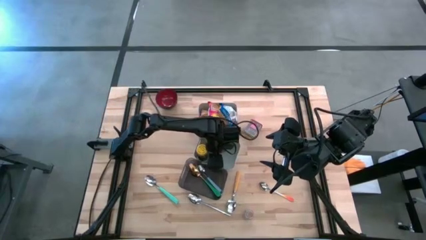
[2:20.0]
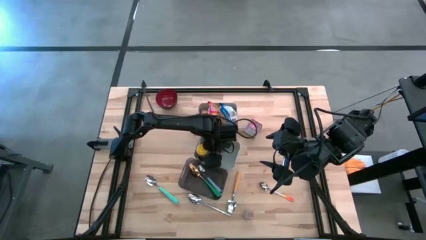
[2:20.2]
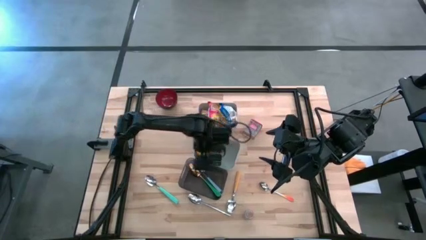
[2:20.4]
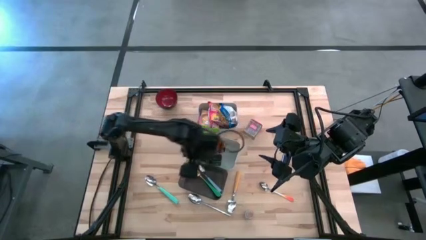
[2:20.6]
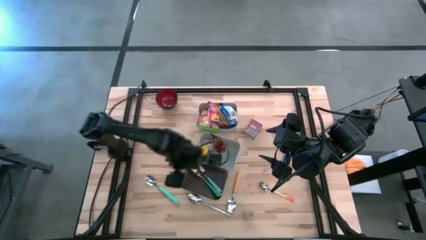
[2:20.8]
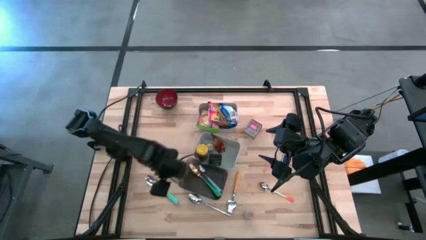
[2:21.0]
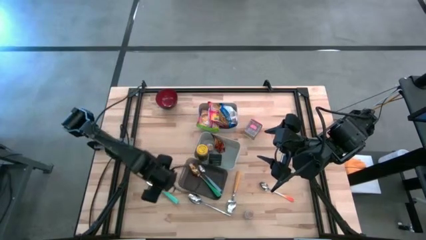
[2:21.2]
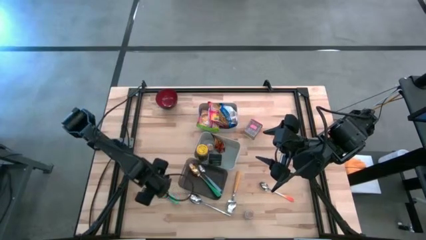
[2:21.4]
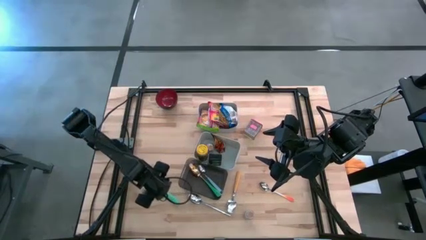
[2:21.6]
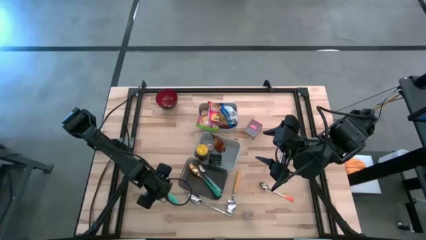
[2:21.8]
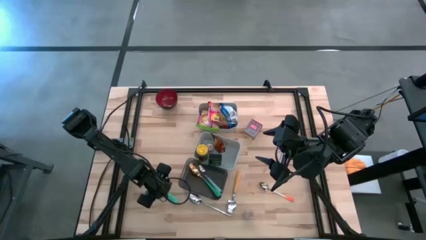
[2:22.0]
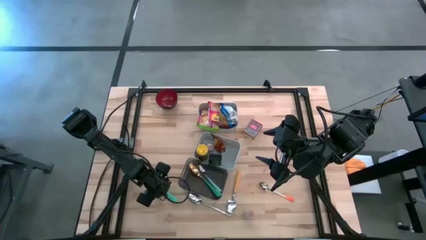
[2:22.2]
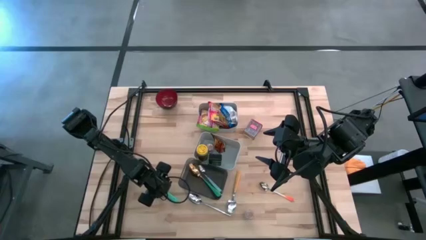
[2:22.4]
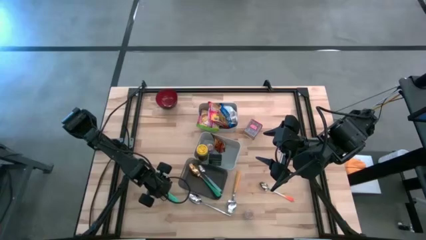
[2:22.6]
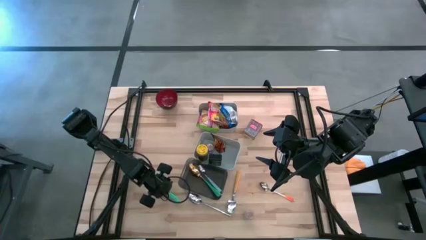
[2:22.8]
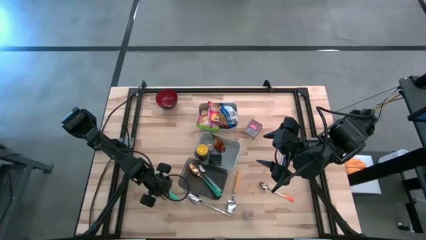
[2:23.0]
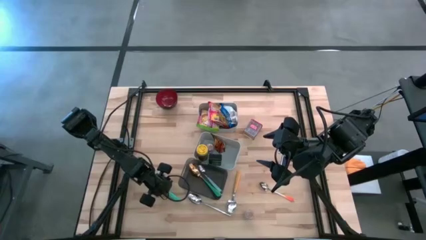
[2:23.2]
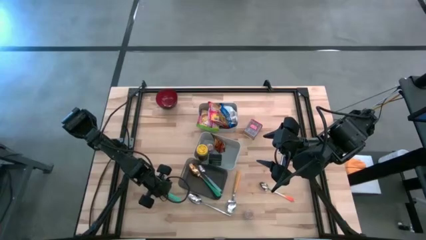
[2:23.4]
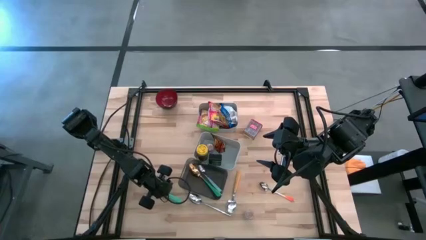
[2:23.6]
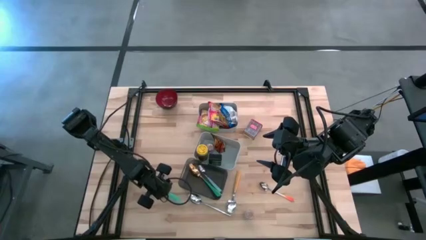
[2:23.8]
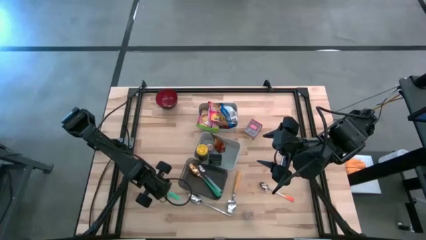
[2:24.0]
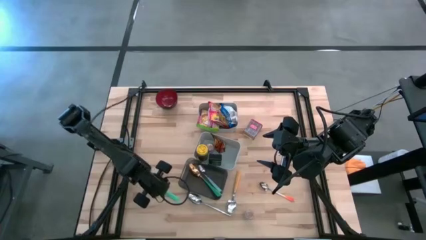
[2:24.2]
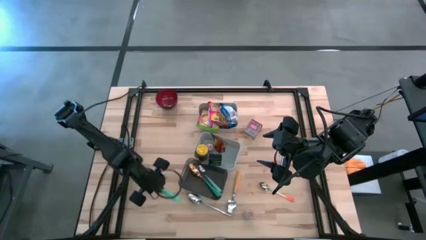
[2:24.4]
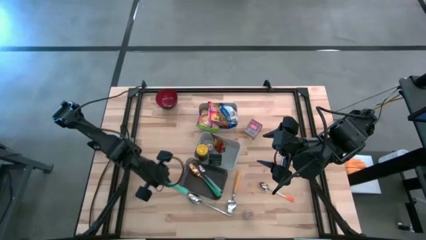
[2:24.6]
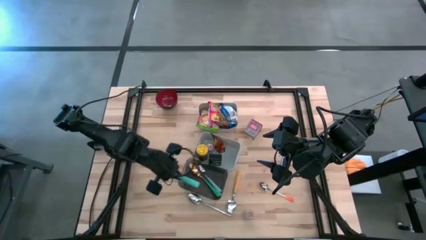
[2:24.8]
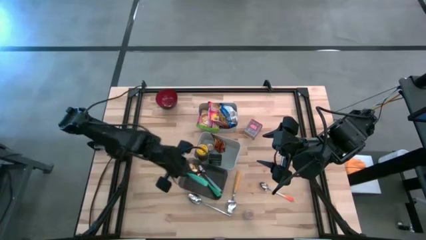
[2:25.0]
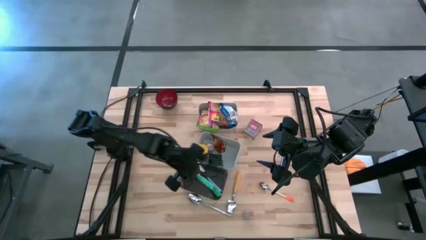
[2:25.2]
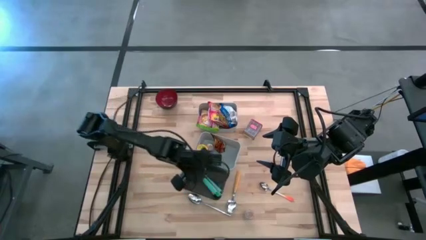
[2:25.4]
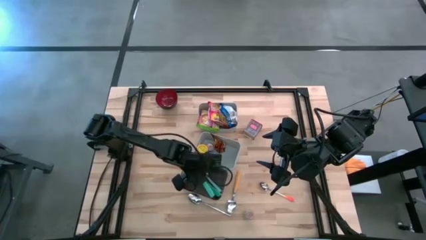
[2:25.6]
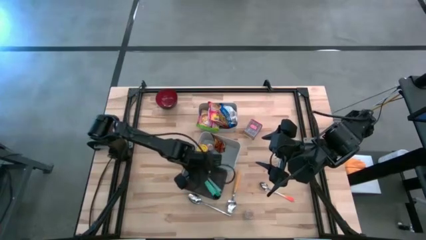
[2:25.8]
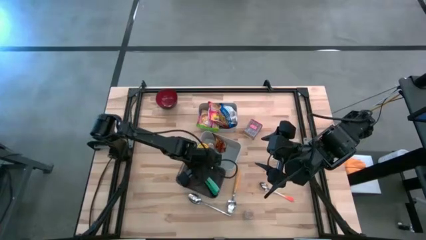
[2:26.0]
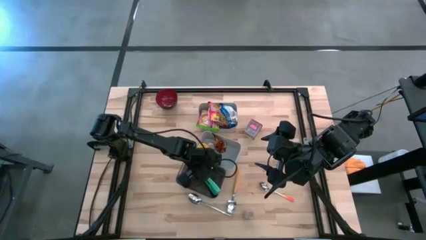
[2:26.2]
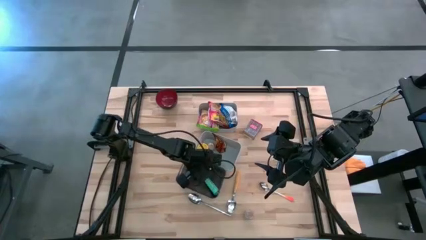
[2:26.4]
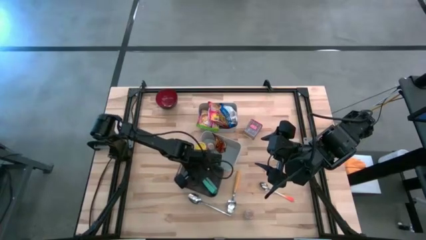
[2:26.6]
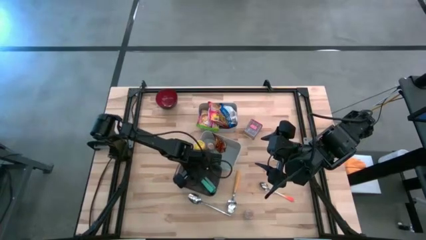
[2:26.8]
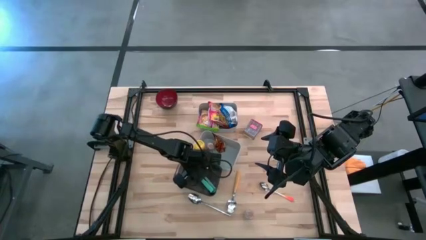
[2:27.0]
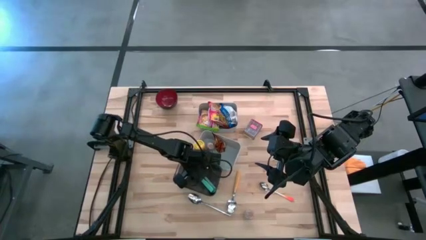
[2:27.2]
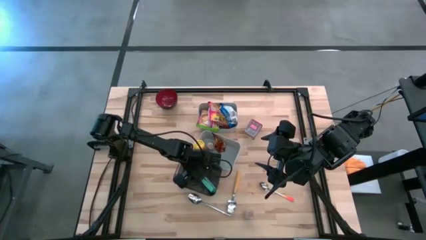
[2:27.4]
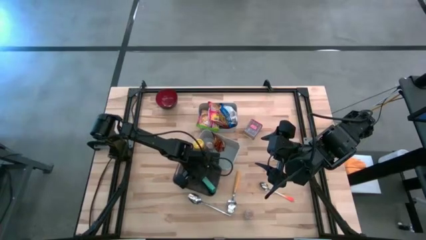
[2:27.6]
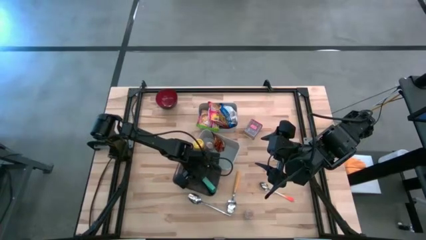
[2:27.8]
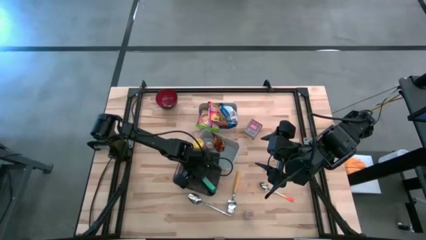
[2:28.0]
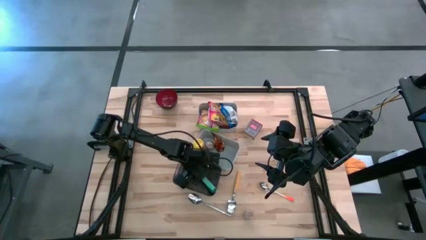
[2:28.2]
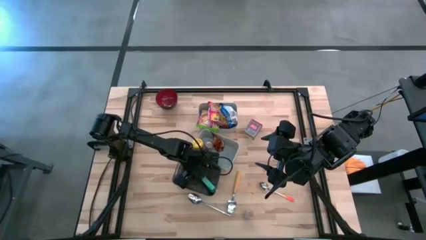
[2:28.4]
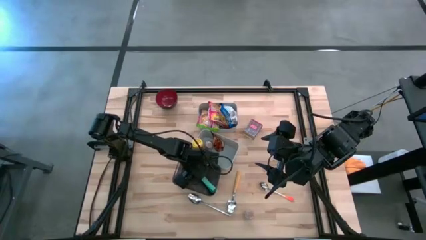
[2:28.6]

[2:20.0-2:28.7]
Put the light green spoon into the black bin

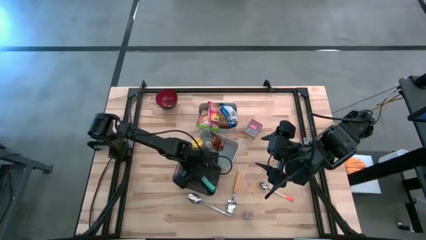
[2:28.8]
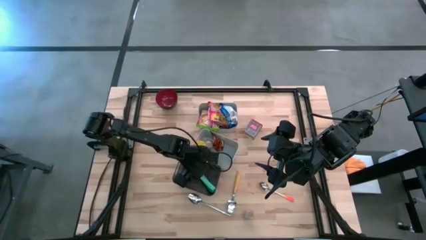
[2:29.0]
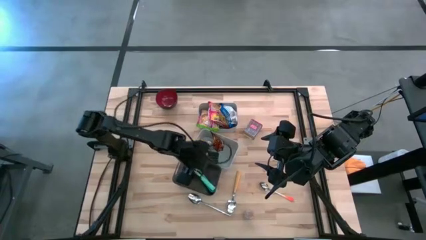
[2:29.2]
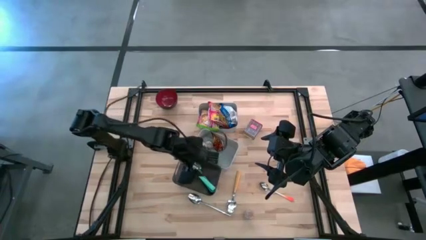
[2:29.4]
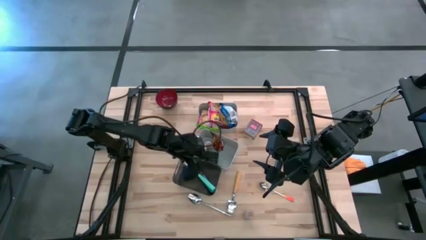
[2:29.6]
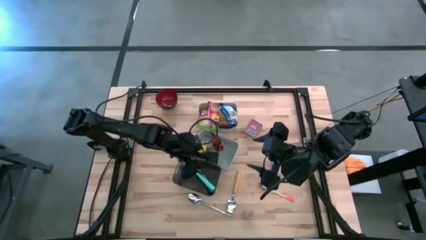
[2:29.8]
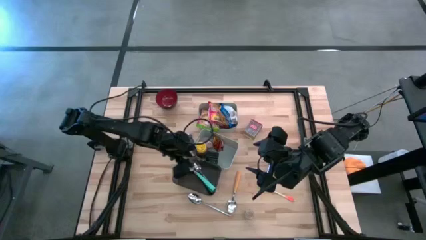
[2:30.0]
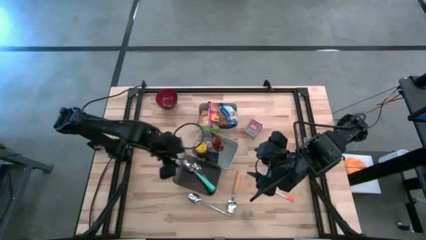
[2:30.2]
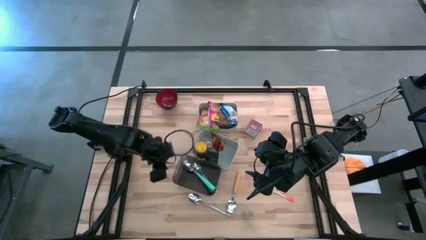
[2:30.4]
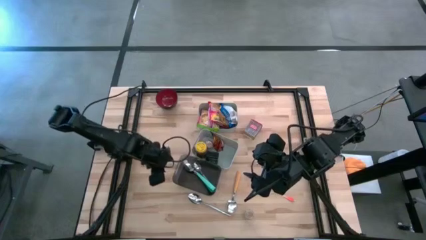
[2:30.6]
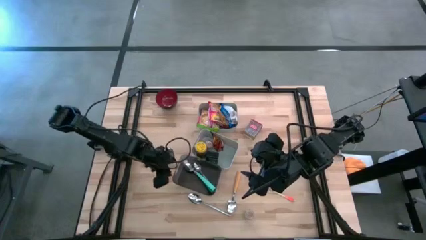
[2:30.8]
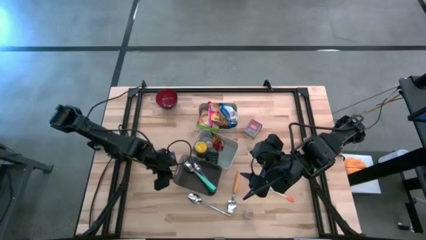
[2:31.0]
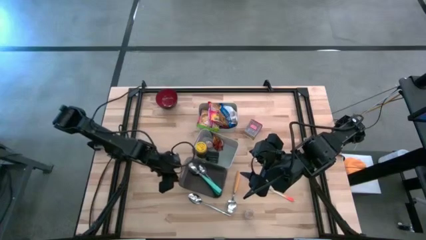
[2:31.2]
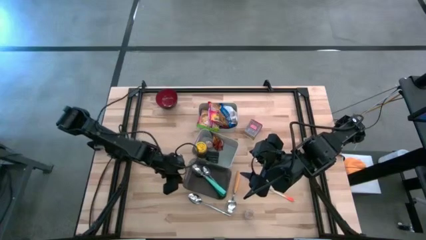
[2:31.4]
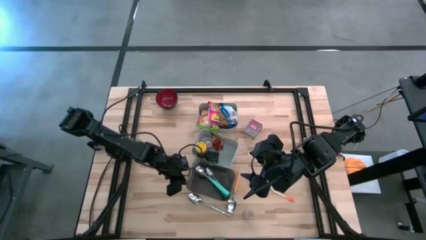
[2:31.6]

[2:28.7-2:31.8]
Adjust the black bin
